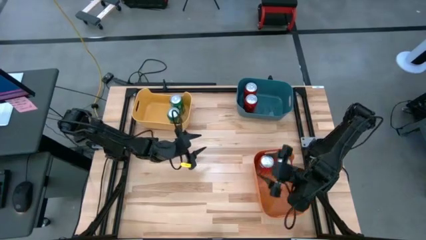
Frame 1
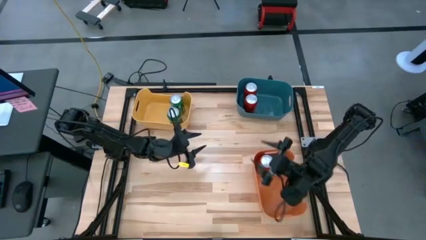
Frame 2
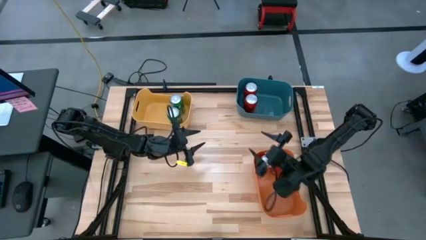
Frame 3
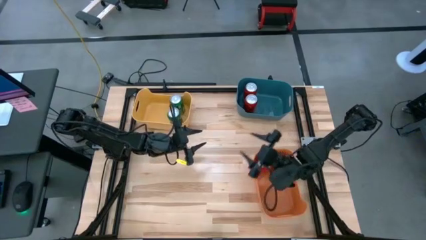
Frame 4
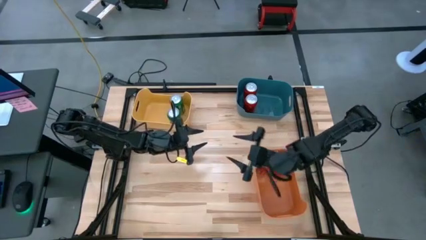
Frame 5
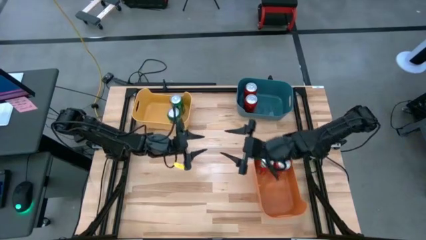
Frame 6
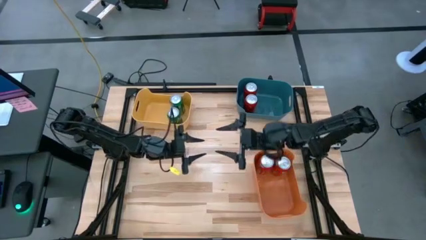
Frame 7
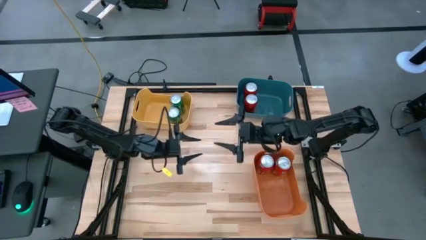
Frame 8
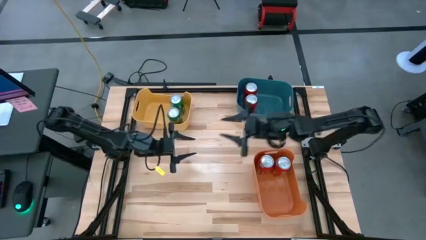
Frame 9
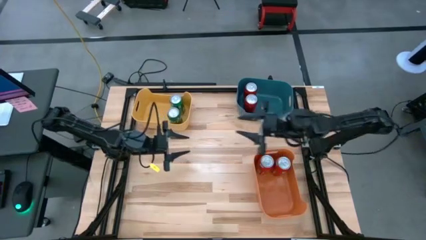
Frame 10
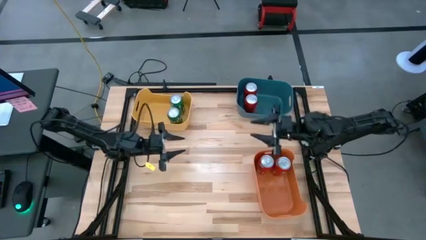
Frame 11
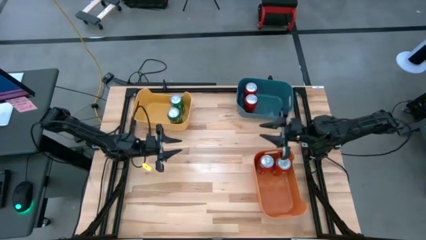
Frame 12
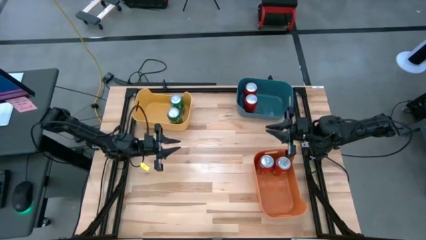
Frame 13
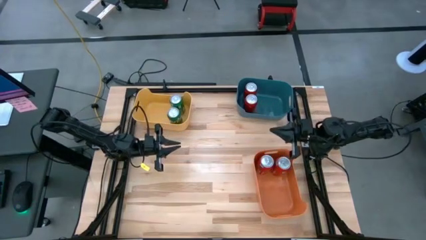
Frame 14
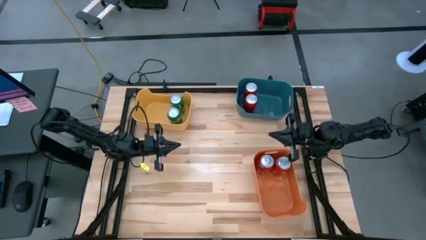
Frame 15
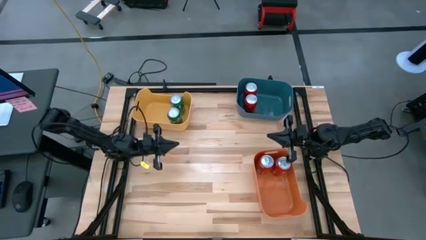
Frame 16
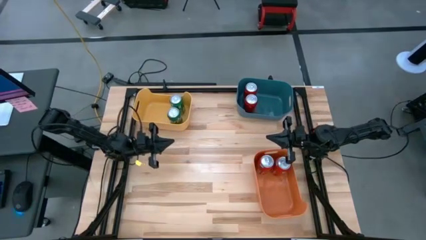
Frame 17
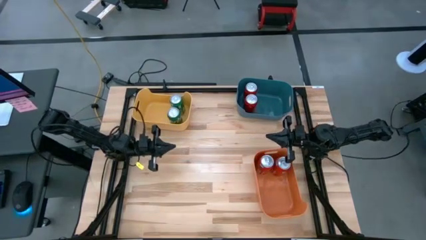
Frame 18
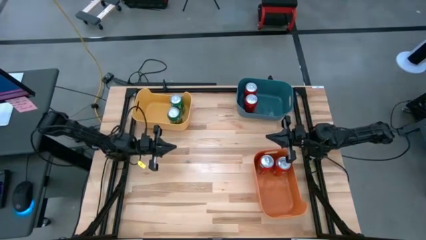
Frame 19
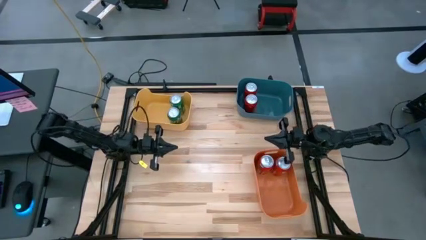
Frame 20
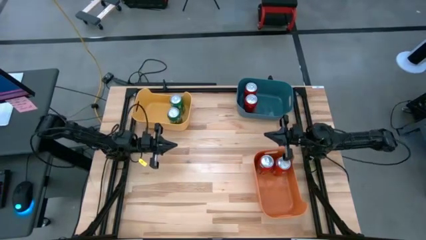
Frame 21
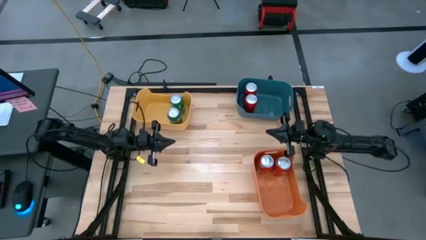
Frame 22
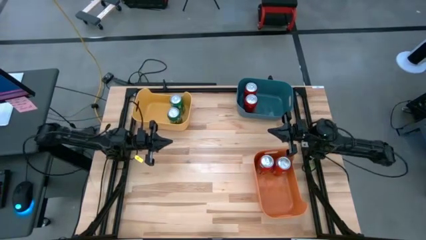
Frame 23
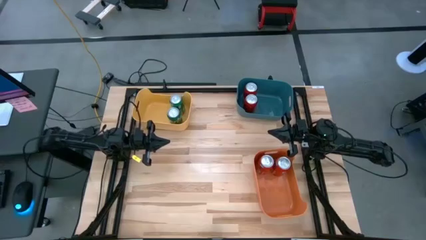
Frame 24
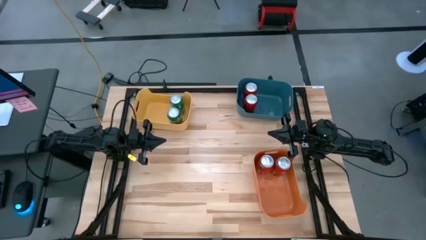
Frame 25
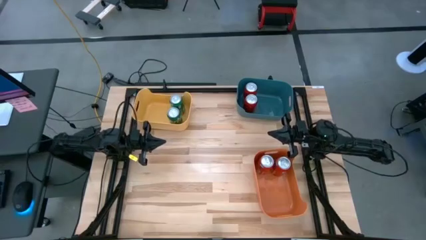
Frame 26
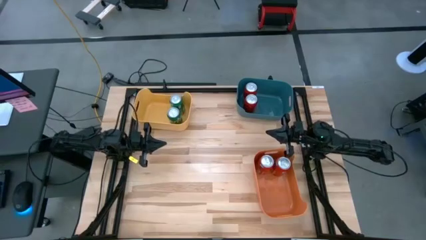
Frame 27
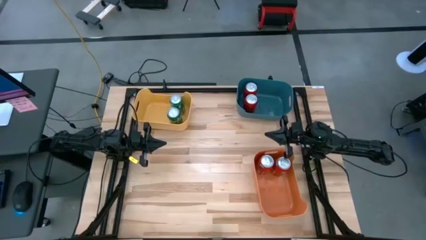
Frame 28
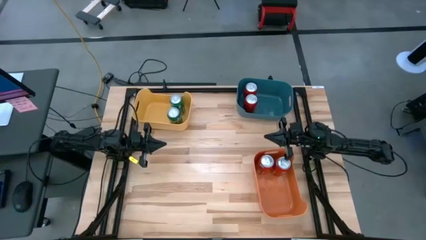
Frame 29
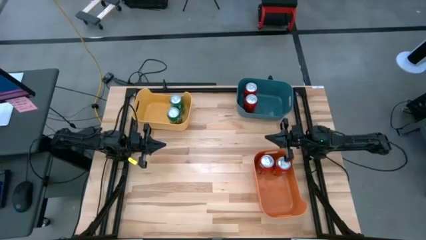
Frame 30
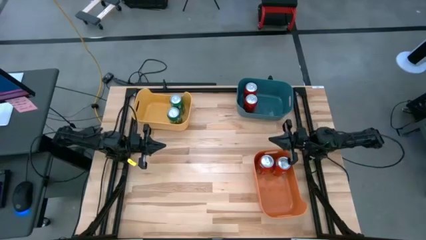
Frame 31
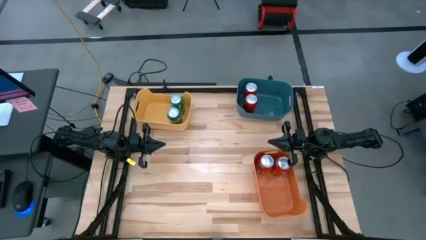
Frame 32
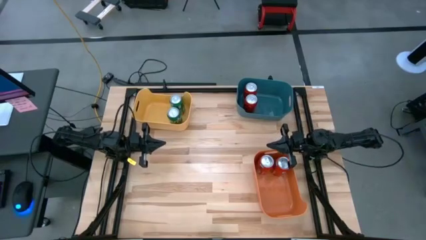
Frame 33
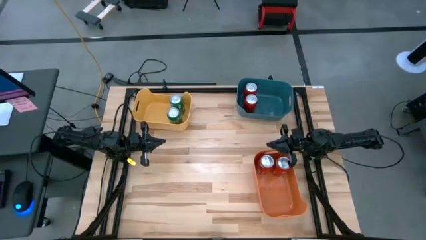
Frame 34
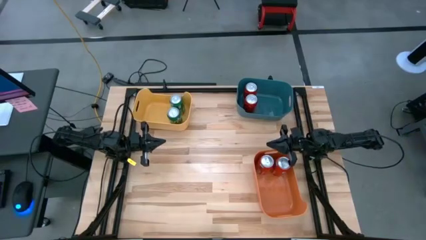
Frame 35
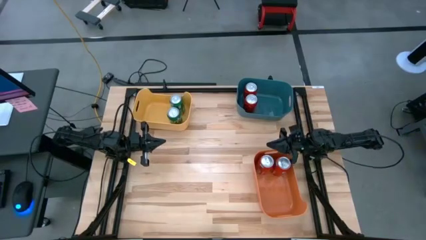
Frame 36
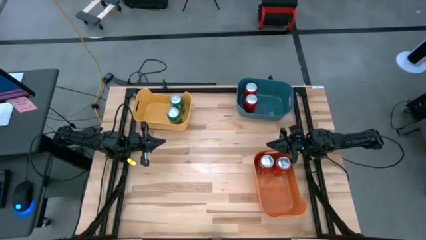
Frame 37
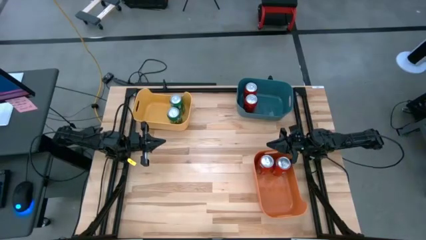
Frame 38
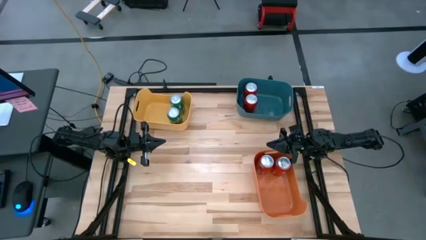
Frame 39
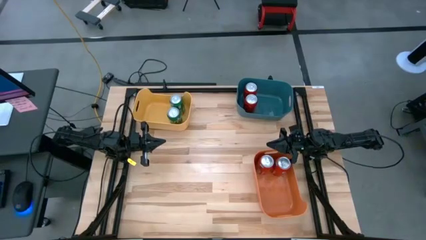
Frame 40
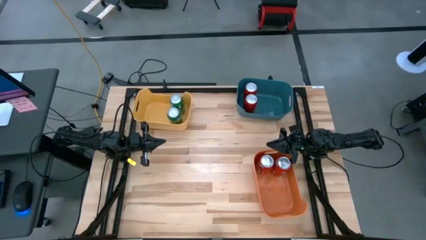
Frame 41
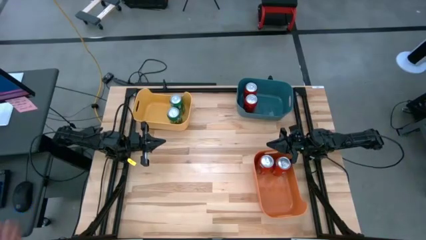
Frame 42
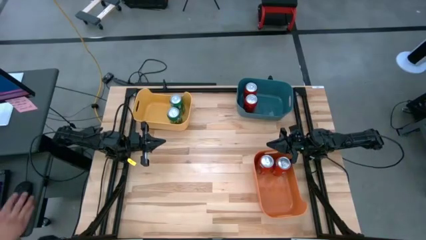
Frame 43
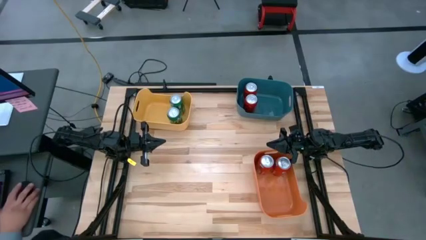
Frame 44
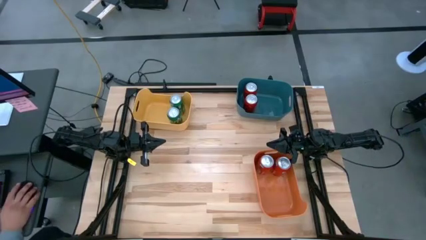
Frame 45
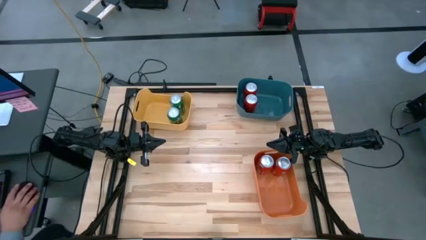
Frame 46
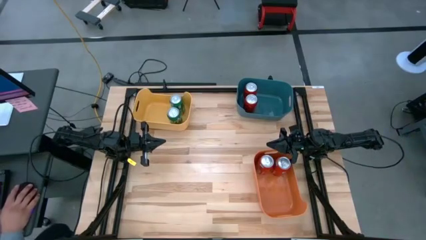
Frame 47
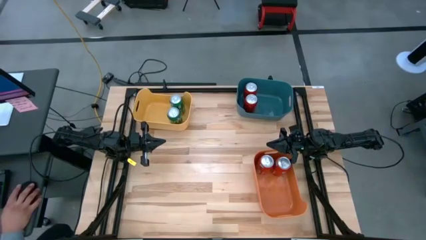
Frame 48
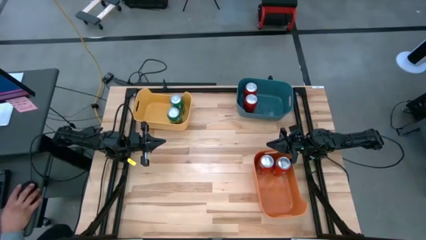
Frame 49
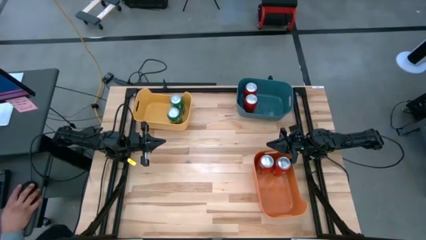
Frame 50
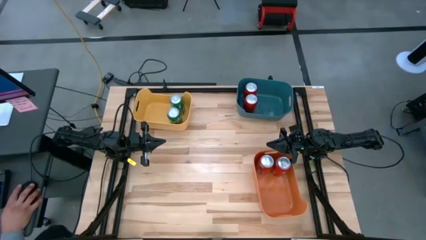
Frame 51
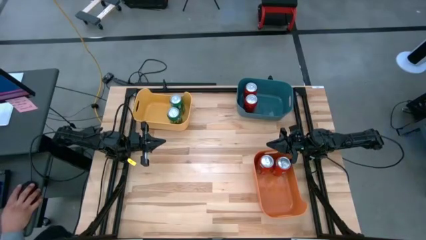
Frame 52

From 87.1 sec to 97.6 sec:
Task: Sort soda cans
Return to Home Position

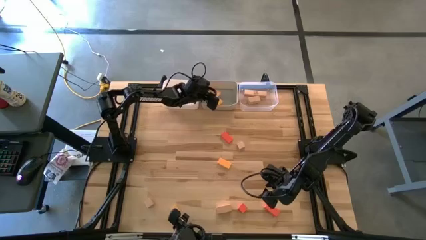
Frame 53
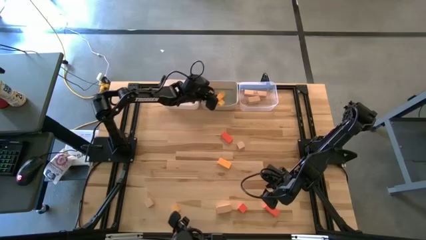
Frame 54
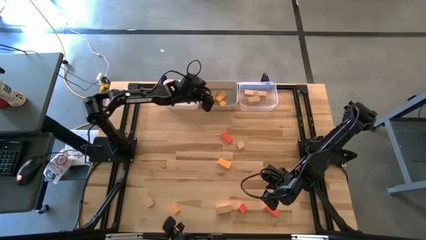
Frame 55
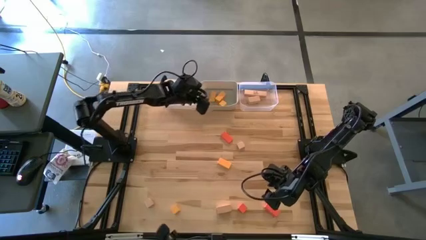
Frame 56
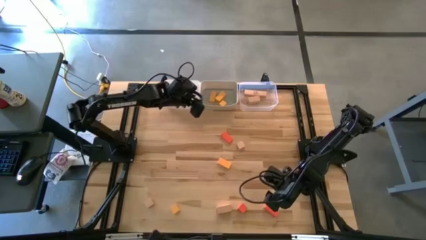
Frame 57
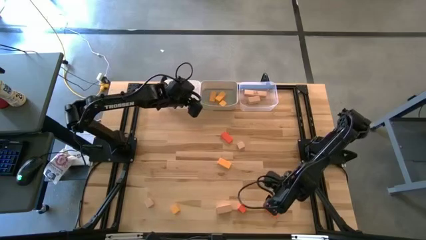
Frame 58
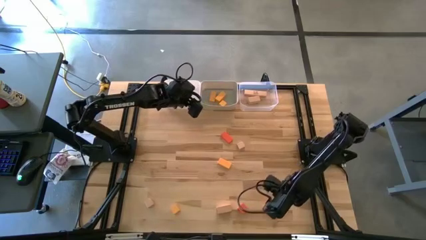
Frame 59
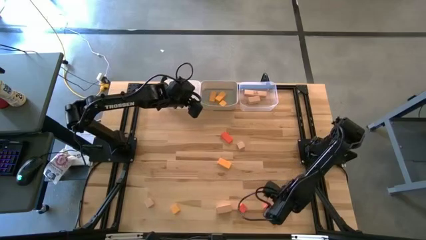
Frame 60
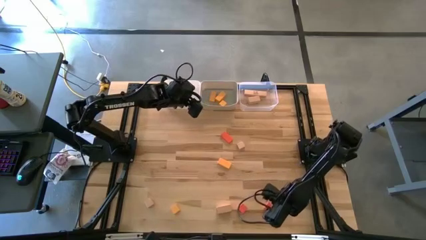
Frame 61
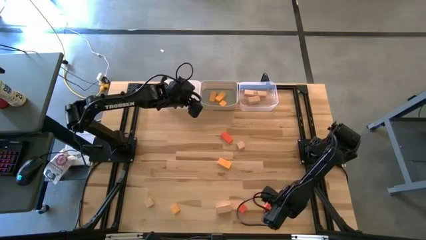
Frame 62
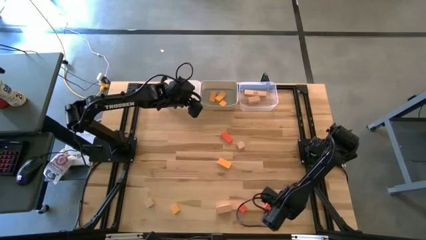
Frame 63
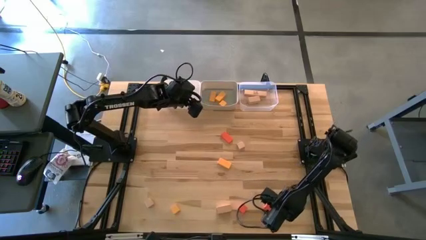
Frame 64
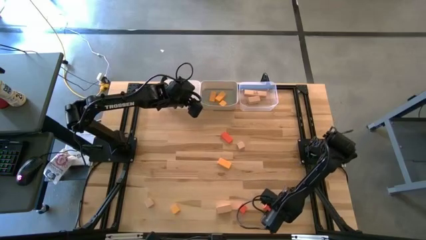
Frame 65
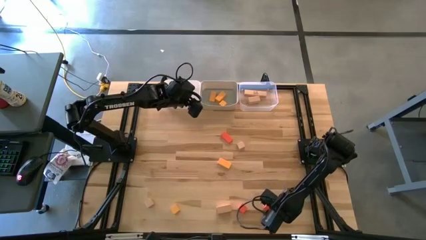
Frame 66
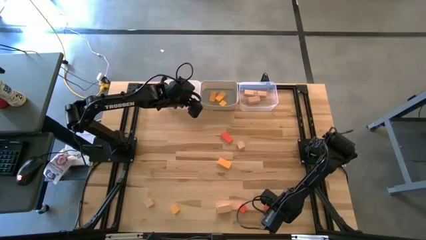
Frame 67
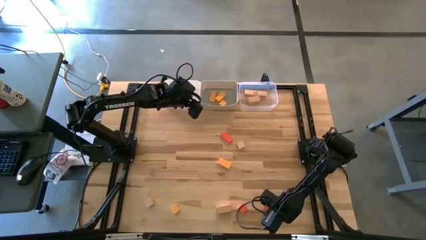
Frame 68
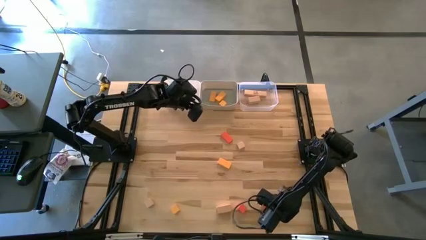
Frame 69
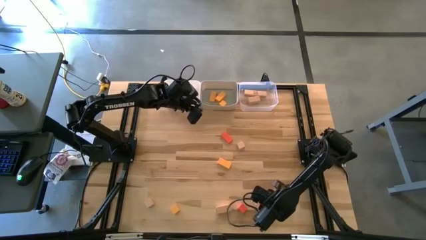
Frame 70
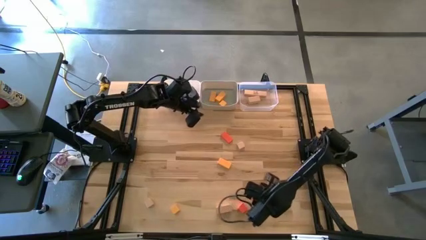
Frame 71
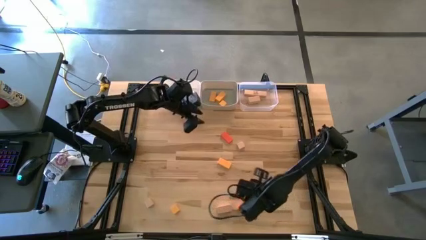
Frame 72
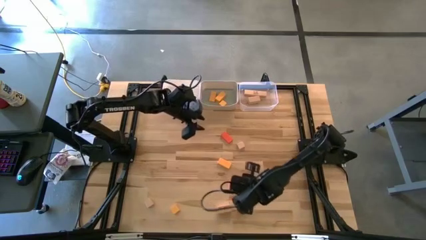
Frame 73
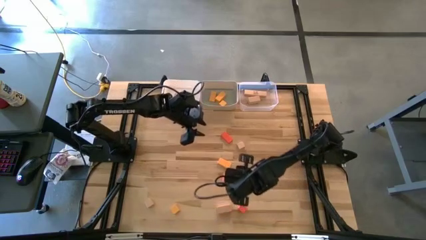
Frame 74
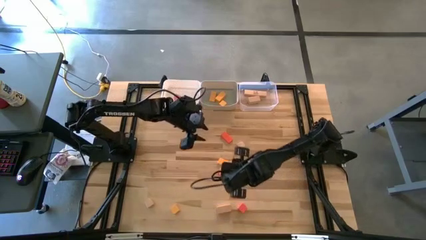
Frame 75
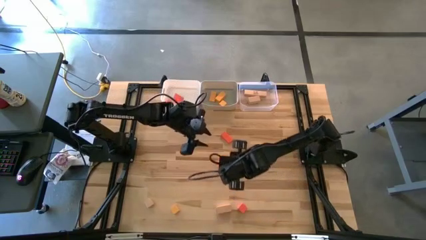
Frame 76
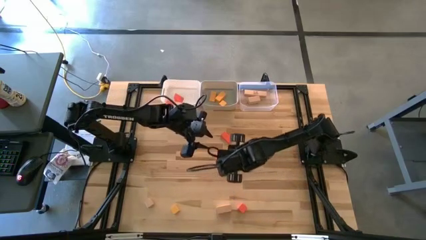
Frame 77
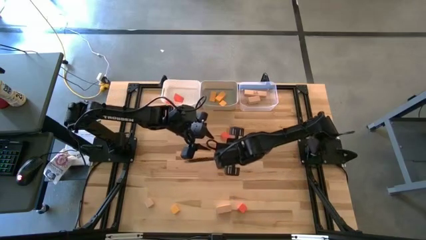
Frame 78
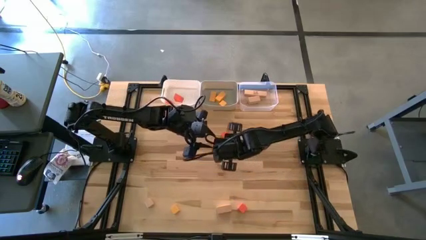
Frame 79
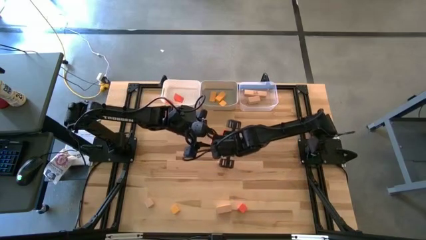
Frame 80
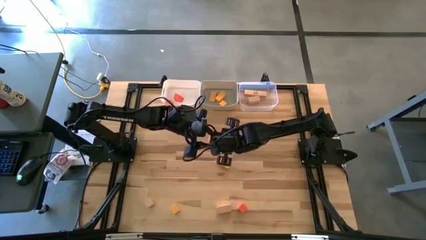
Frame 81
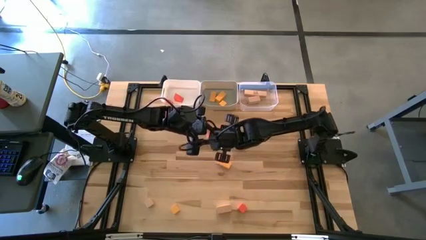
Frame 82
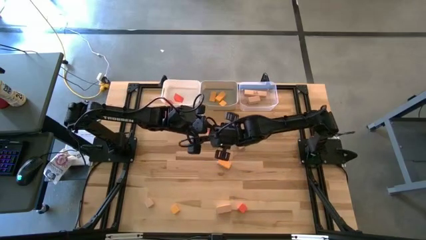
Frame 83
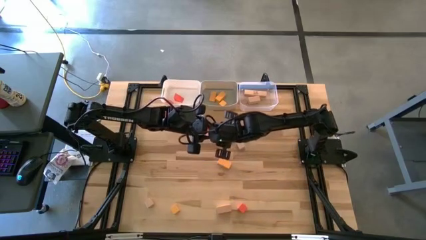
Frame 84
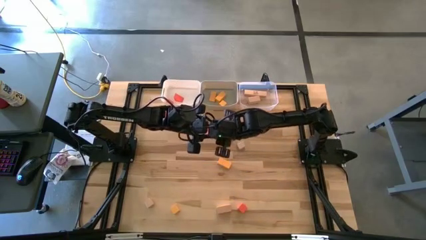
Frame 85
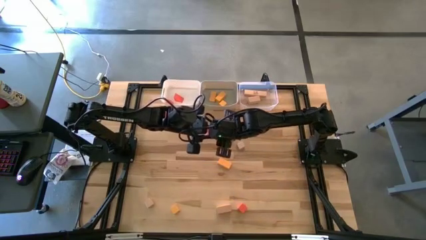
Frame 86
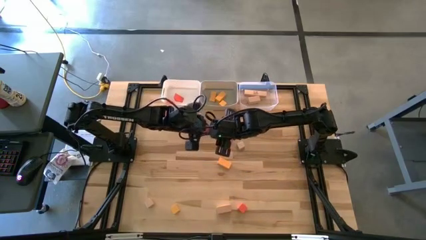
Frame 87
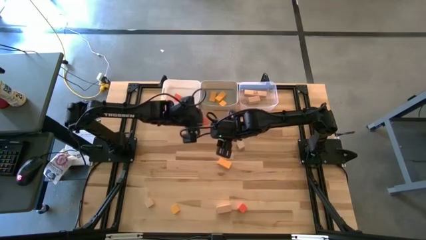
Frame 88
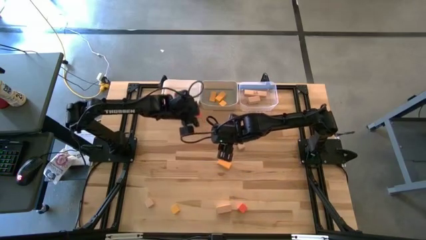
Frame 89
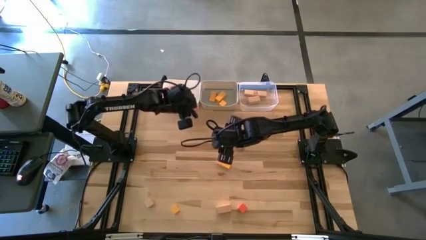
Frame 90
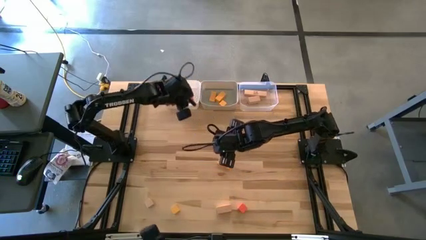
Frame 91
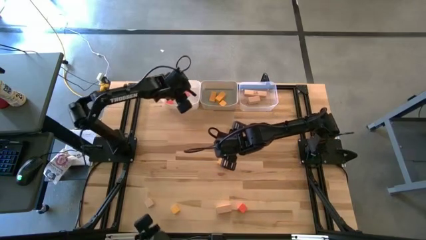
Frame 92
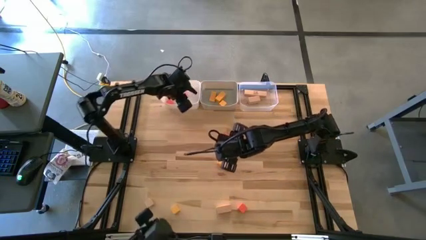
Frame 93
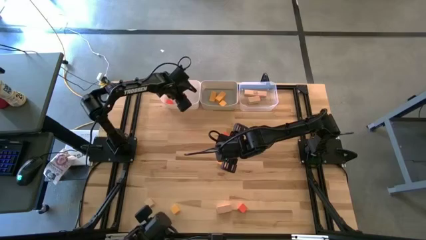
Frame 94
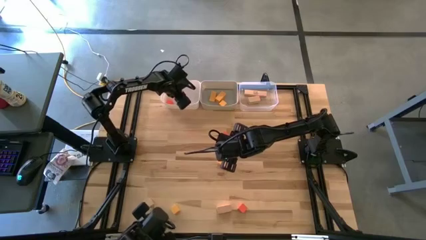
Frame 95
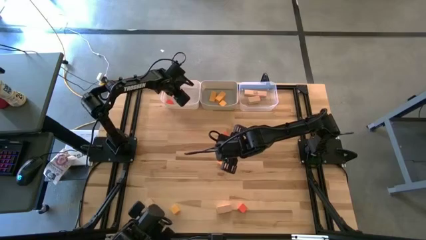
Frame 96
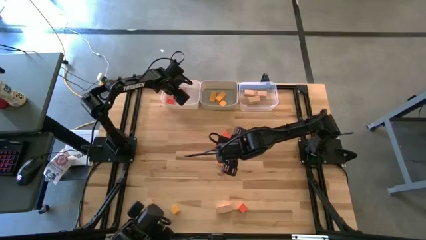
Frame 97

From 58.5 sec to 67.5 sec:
Task: Sort & place blocks by color
Put the orange block into the white bin
